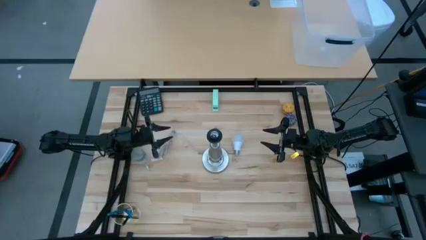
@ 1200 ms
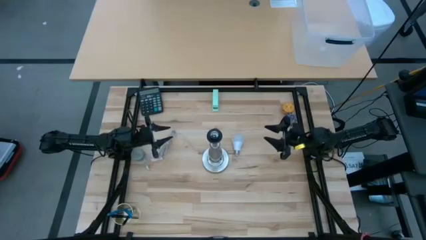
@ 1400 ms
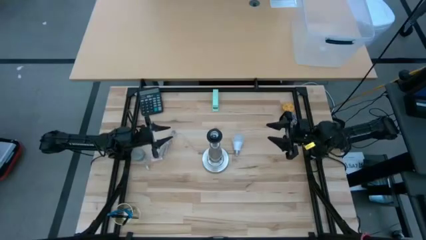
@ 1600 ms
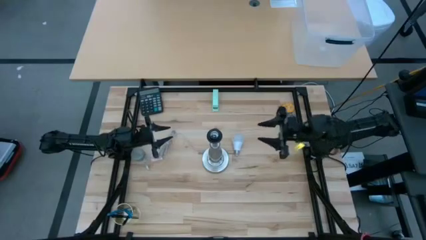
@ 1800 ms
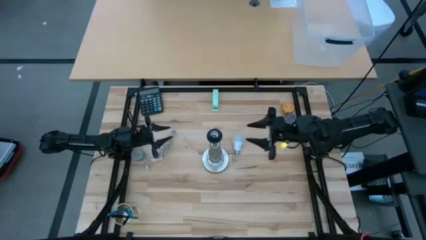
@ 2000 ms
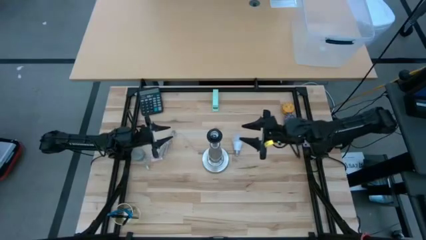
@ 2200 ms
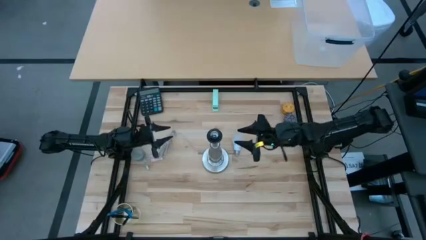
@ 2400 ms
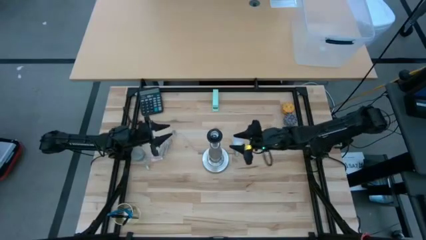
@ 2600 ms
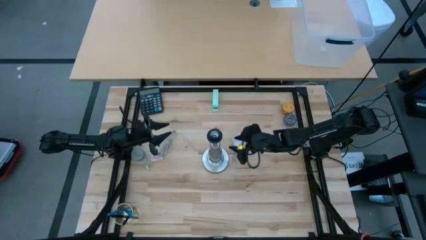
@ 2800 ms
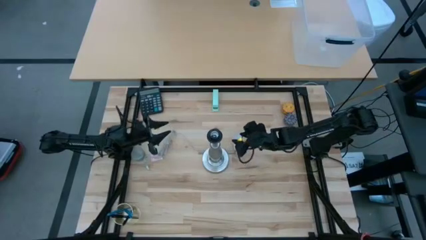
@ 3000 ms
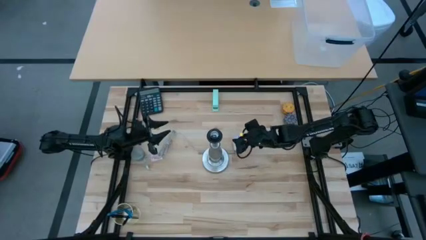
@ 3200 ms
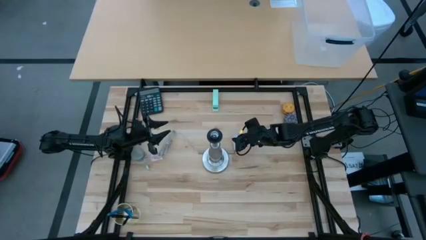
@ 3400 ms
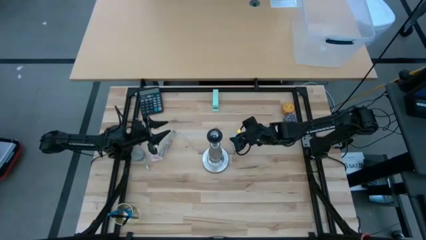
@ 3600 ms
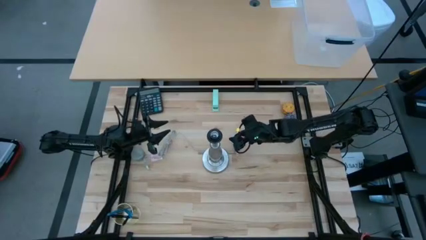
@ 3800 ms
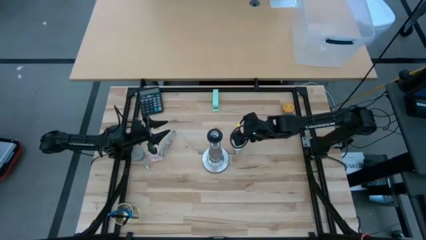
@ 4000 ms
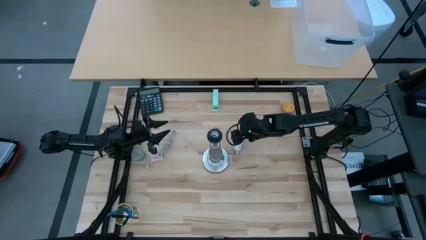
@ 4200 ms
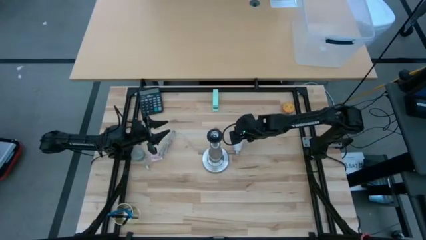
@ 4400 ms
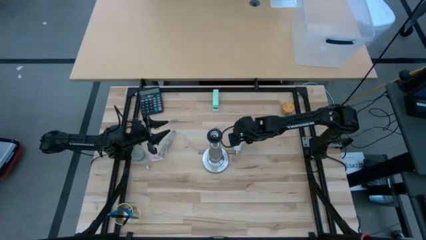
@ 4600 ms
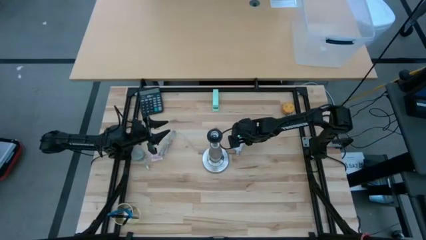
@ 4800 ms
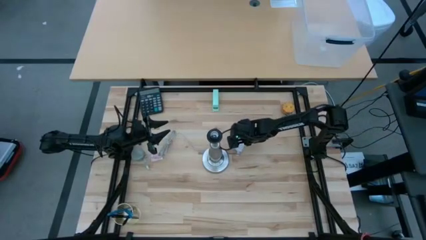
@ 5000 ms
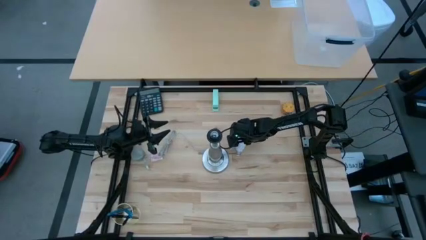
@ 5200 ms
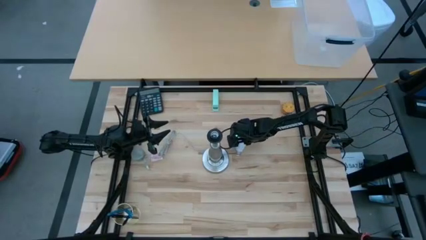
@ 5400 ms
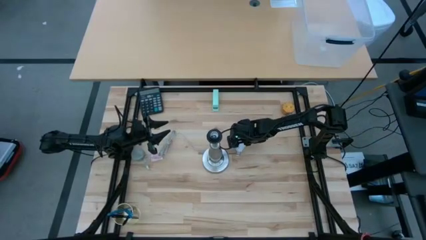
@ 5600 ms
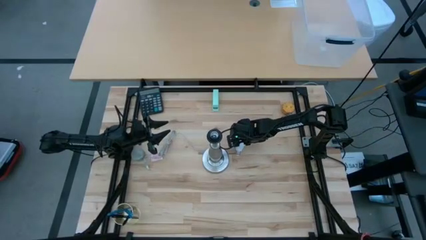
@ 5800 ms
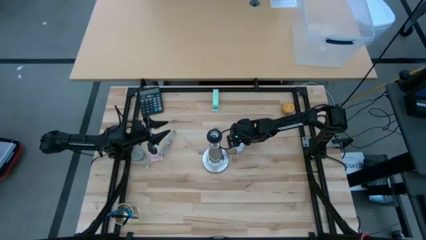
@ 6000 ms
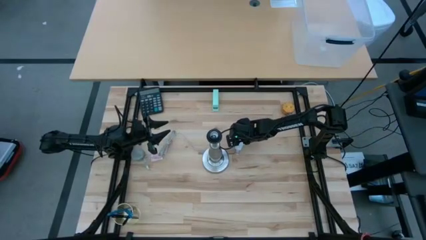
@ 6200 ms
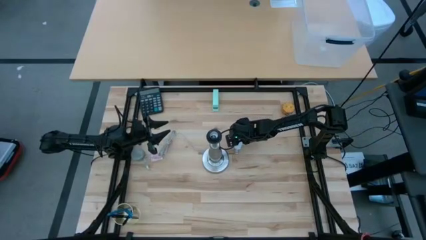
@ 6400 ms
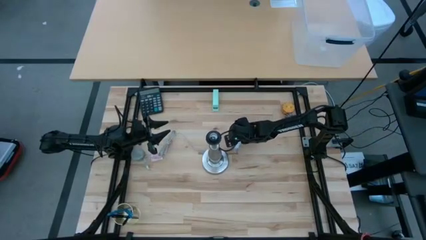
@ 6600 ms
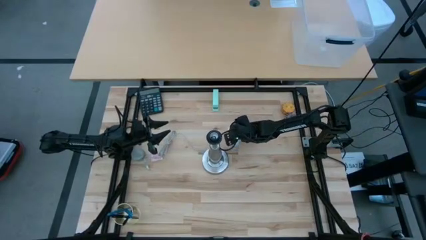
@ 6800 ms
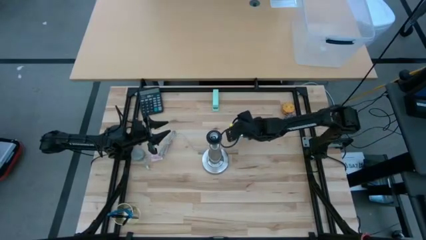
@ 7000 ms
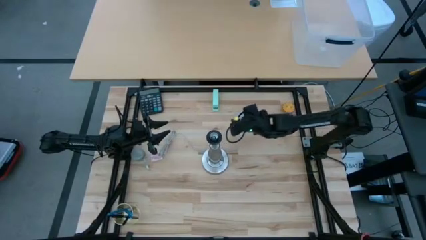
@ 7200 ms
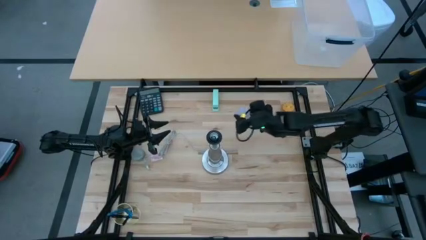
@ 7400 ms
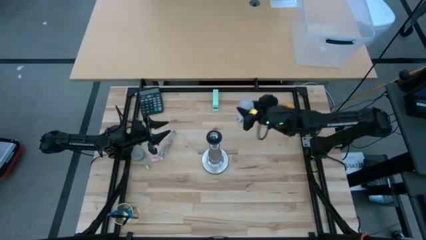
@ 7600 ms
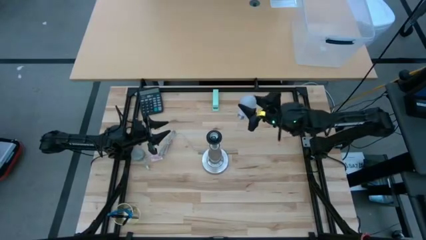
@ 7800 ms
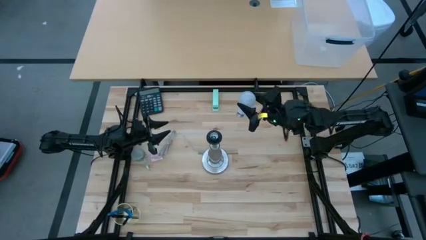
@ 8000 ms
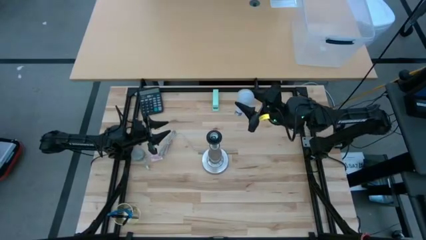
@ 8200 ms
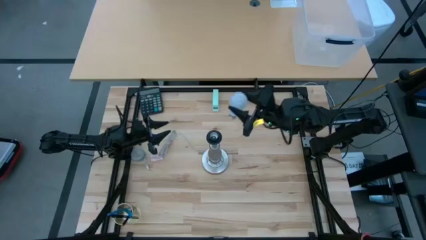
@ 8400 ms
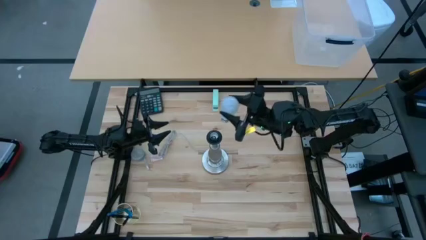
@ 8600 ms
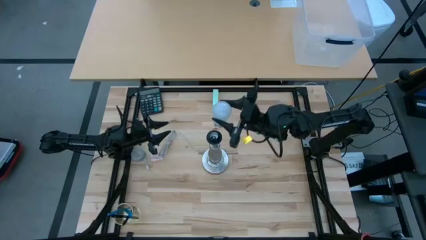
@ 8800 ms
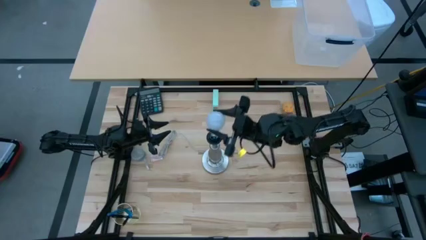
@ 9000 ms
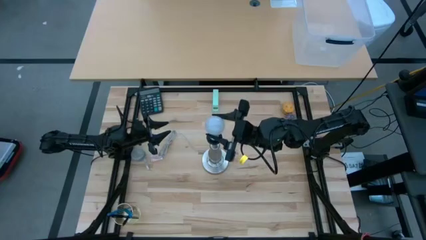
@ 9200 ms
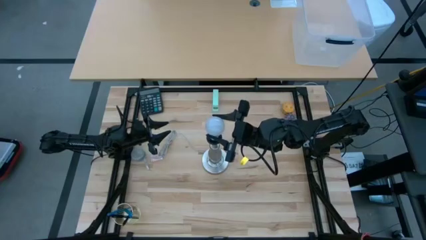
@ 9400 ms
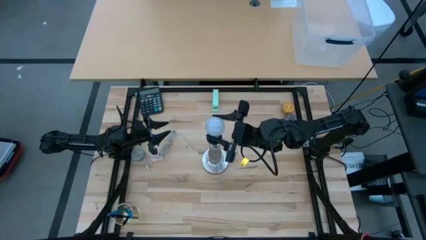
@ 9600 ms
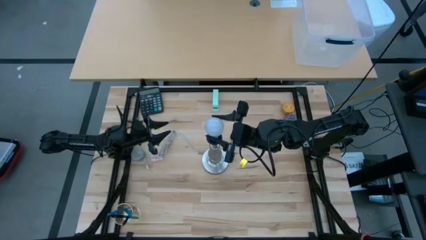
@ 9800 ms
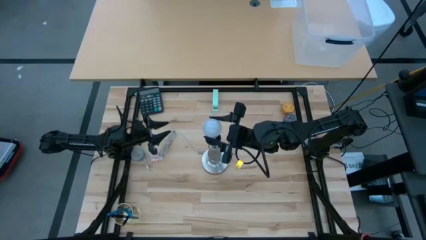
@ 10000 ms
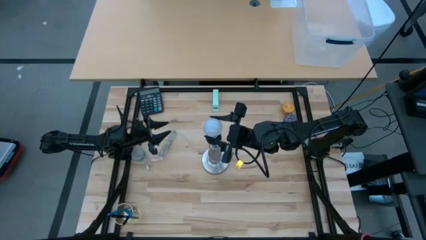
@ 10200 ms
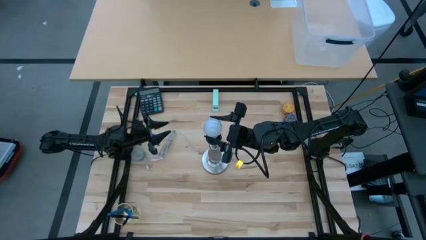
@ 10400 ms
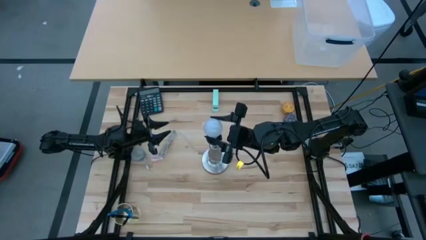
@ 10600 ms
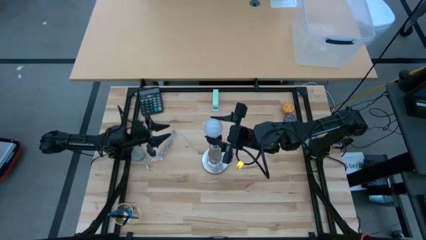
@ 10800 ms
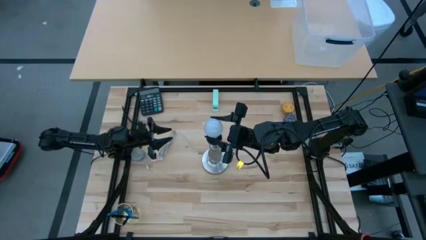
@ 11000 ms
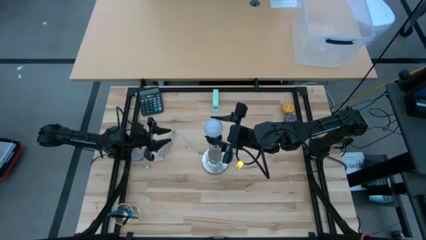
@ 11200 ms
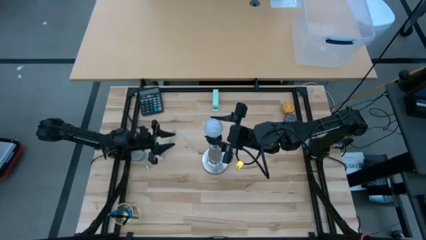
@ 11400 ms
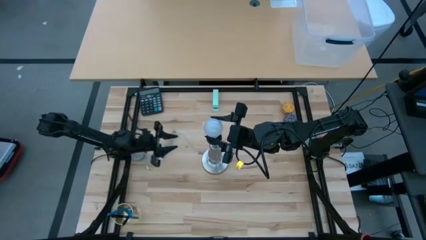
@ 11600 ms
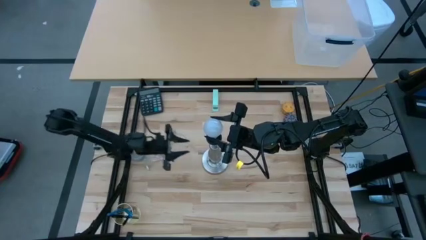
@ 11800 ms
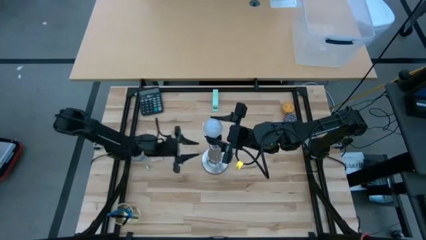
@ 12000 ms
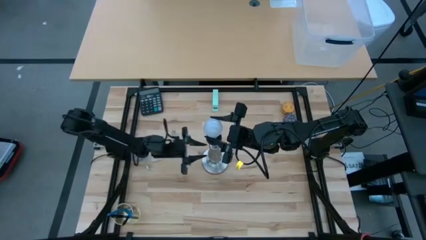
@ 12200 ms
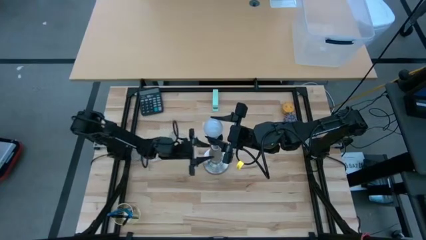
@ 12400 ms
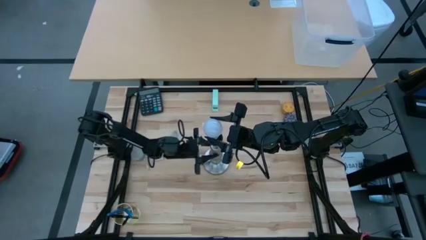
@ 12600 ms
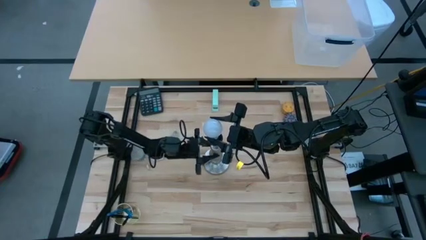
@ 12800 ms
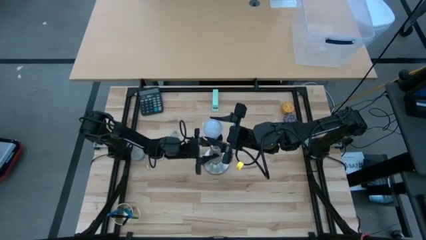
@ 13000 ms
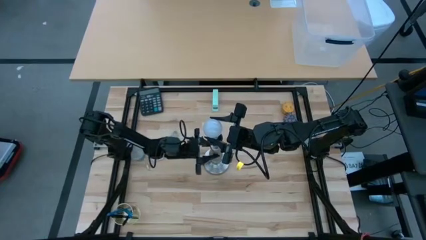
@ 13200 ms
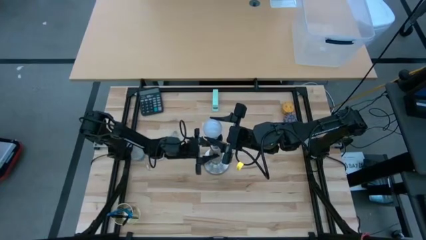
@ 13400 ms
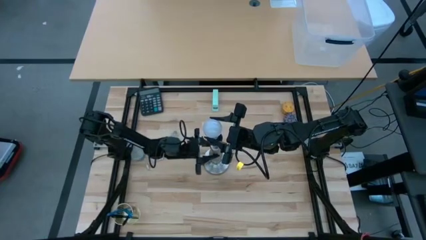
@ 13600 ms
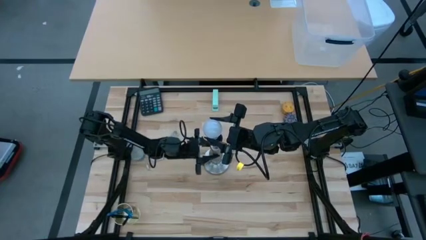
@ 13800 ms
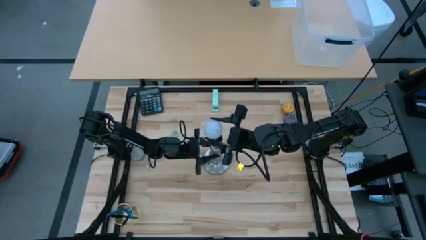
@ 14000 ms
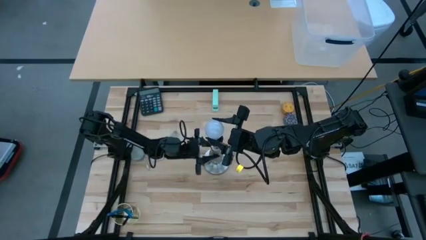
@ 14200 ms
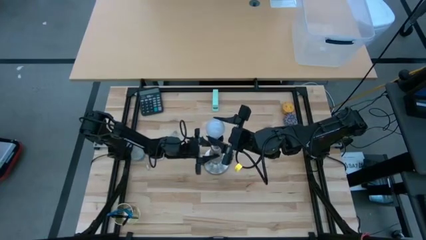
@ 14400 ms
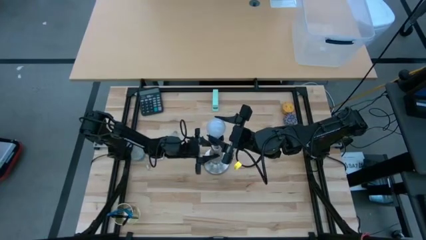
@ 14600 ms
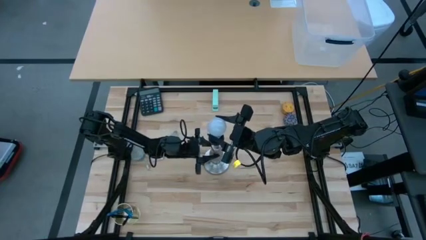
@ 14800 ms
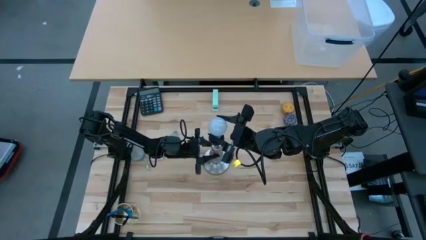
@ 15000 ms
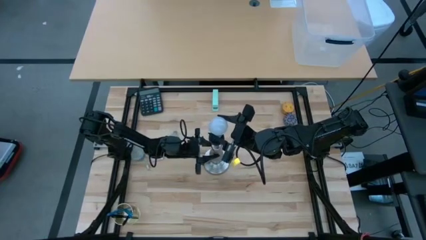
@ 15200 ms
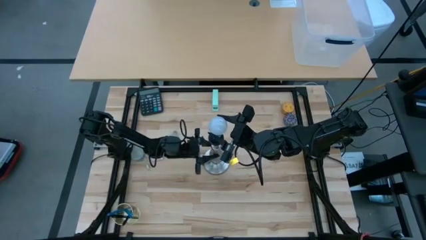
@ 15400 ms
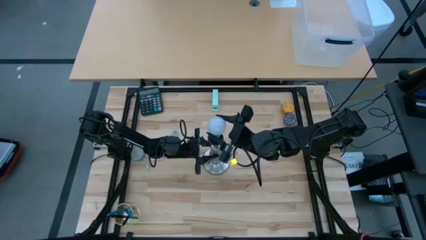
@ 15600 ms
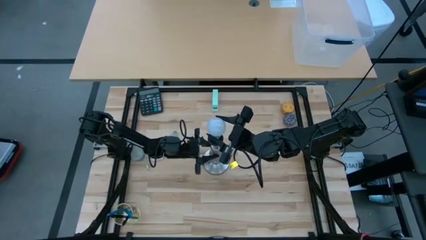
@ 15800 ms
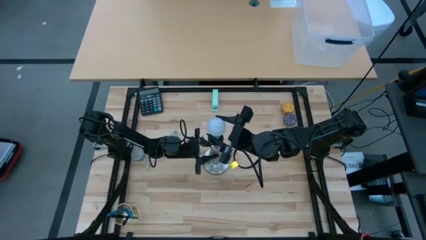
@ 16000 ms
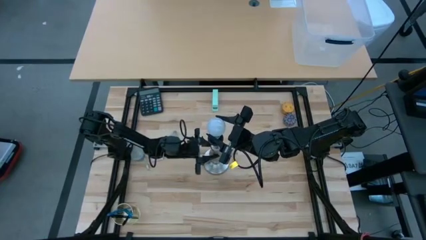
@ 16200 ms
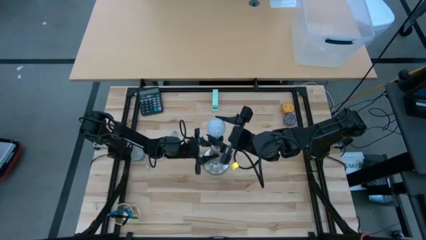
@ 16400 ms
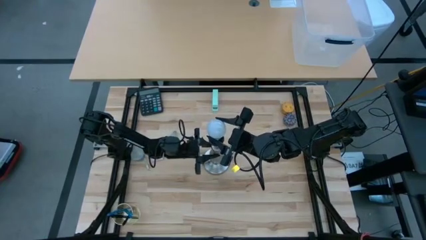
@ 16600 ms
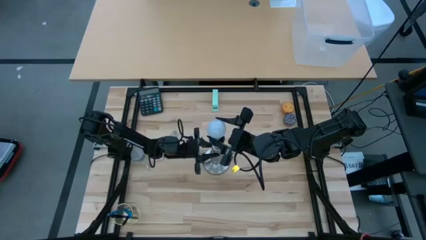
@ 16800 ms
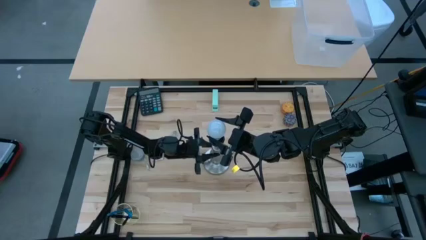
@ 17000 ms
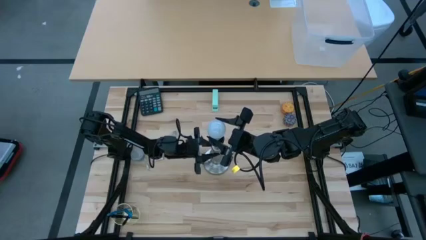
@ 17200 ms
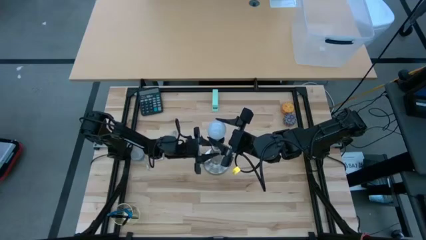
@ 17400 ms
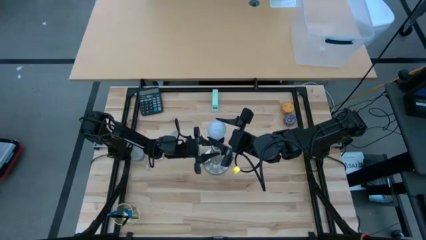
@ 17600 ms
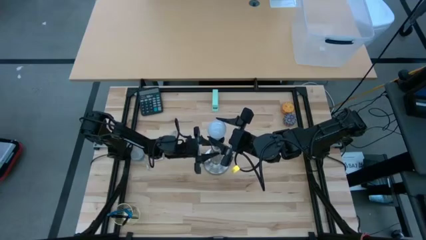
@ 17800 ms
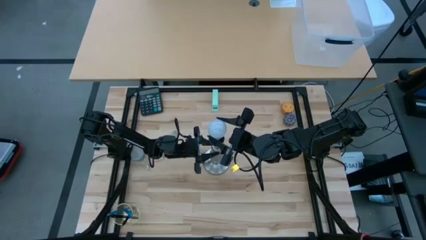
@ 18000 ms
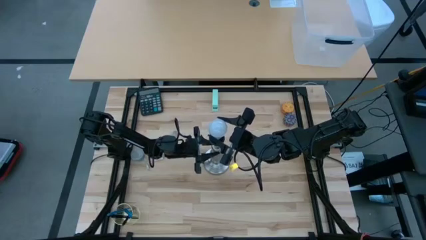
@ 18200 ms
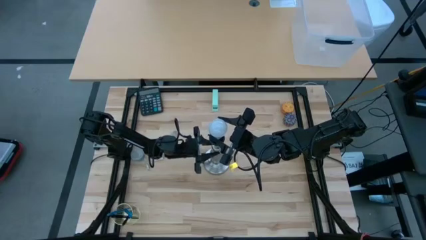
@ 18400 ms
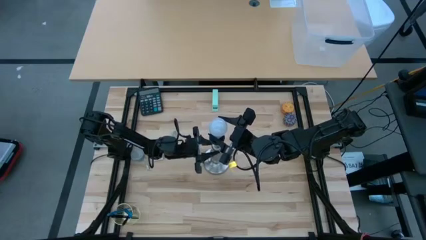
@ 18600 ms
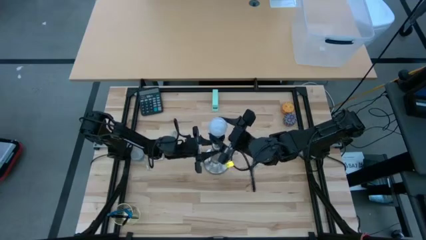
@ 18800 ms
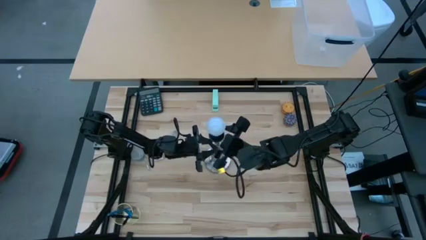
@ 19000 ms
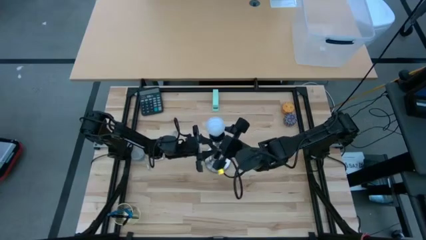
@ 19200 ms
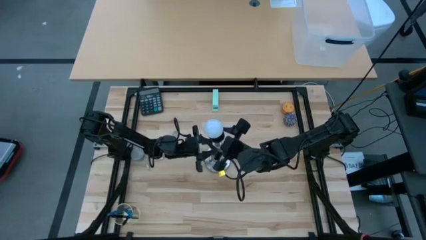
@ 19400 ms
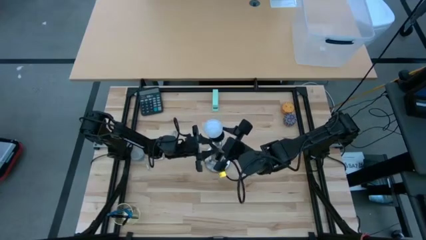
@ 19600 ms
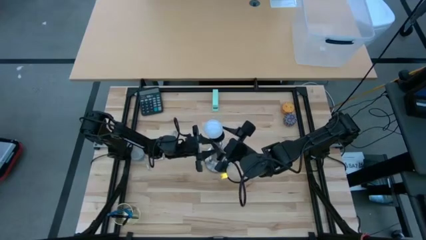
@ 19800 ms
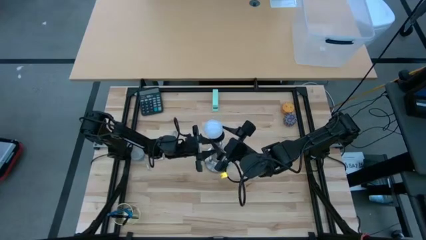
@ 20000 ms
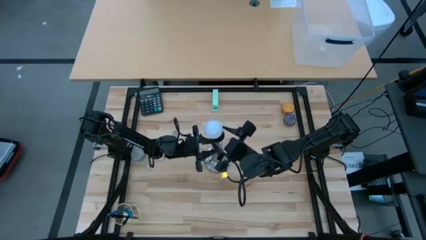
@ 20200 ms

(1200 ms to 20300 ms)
Task: Screw lightbulb
Insert the white lightbulb into the desk lamp
